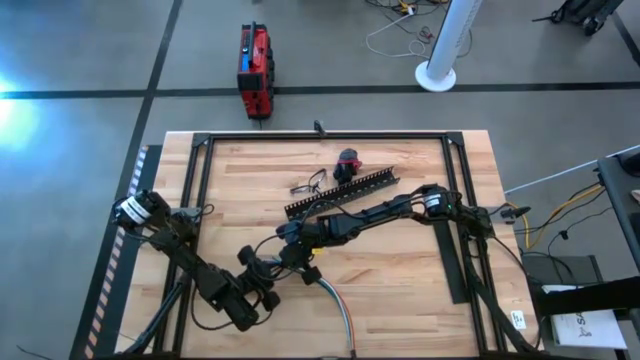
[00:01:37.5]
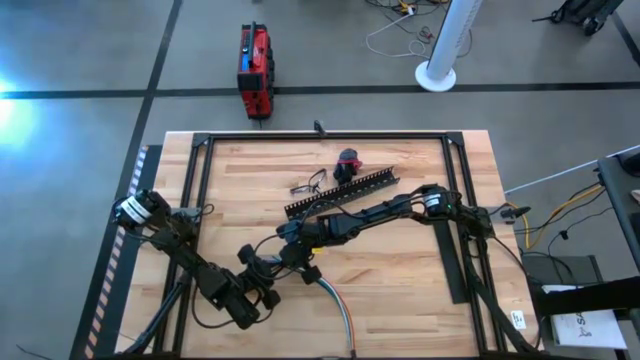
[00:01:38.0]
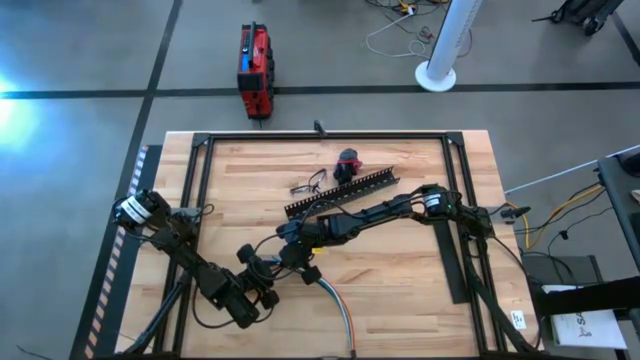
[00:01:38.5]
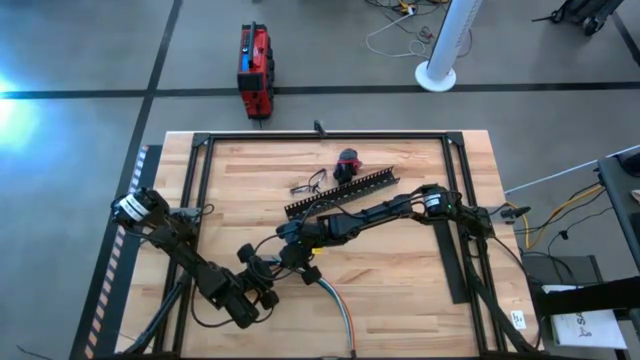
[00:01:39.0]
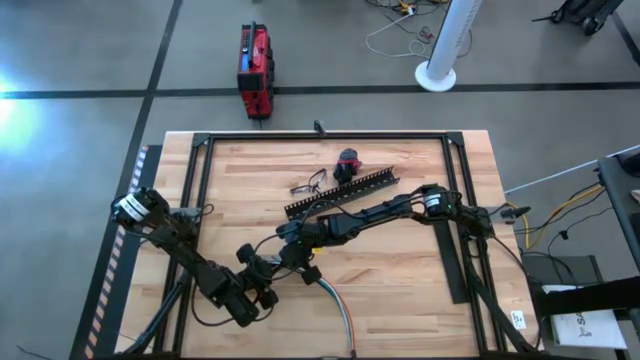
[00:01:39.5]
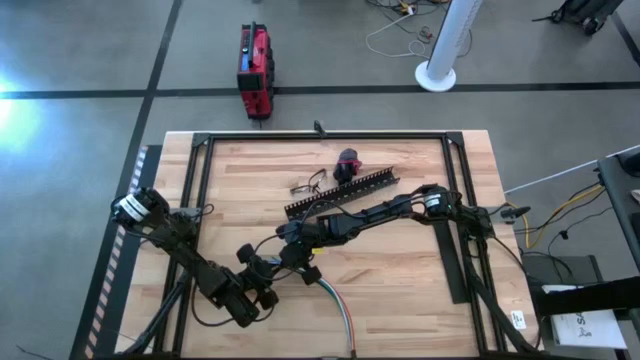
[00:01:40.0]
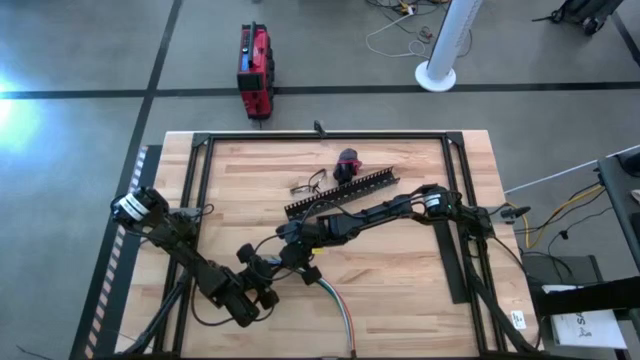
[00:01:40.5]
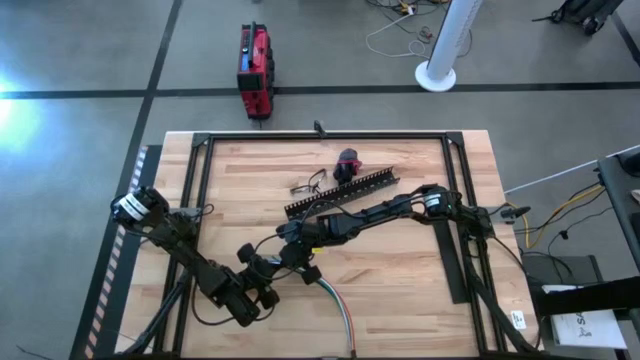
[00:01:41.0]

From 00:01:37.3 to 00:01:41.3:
Task: Ziptie cables
Wrap the cable wires with black zip tie

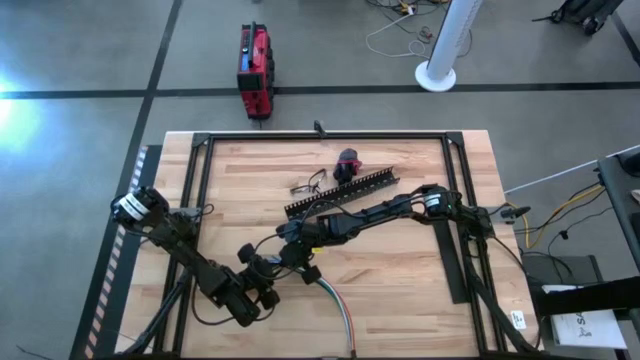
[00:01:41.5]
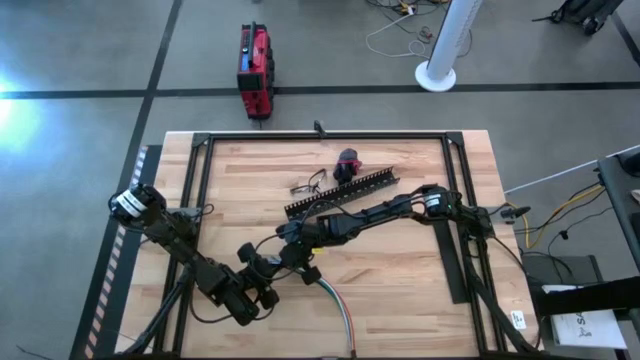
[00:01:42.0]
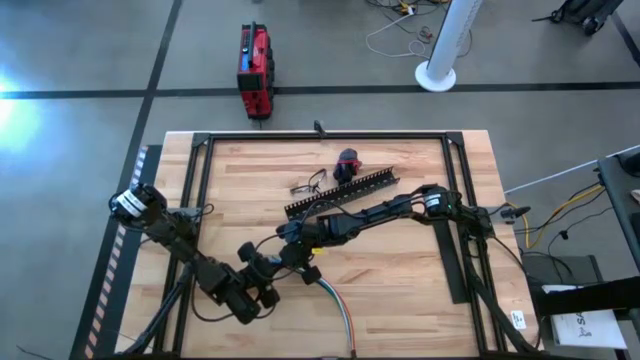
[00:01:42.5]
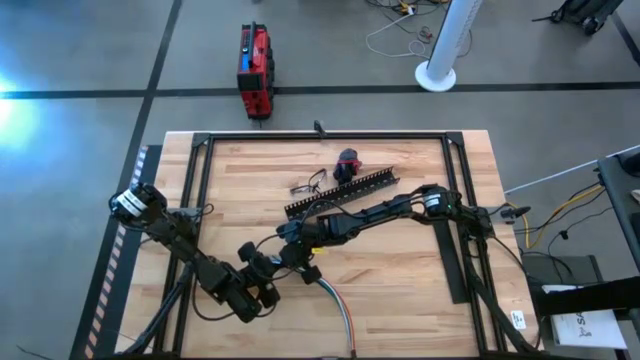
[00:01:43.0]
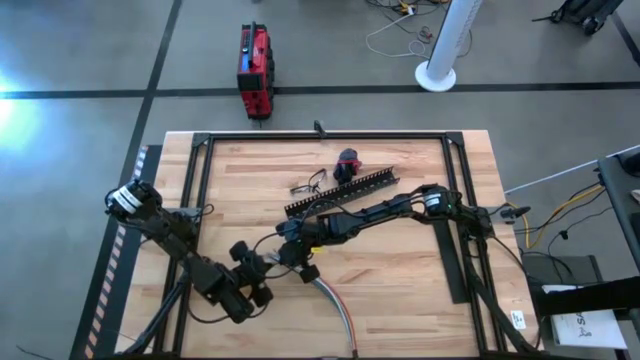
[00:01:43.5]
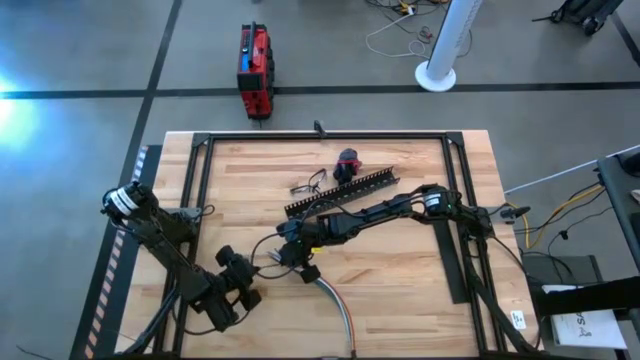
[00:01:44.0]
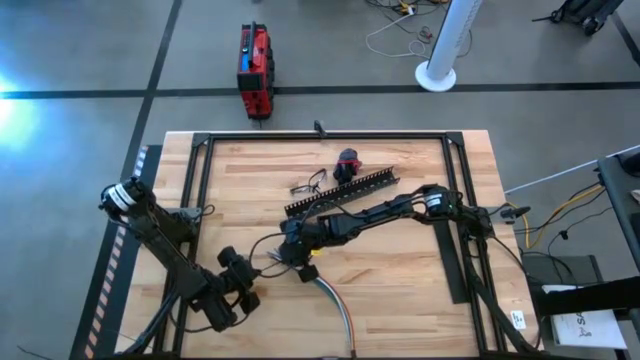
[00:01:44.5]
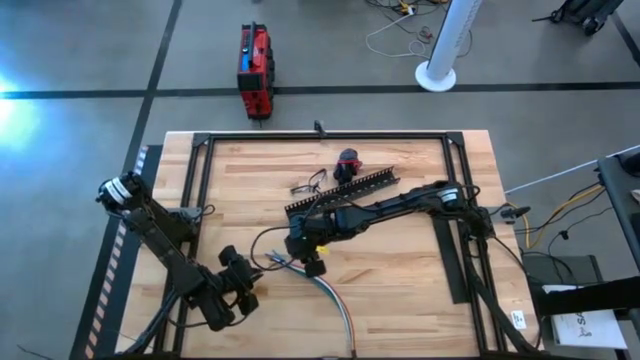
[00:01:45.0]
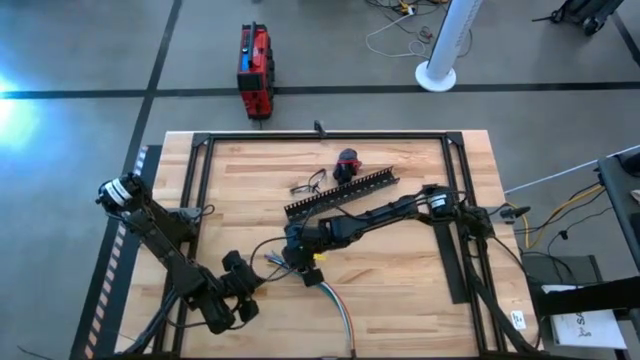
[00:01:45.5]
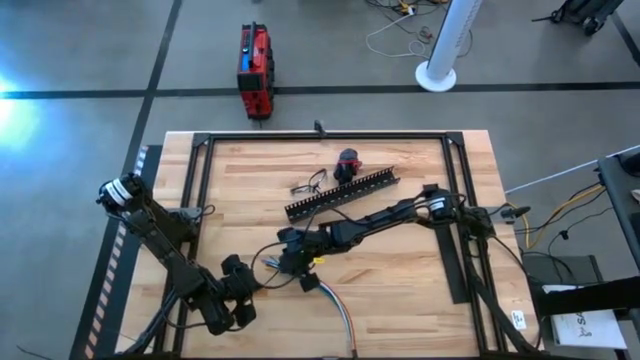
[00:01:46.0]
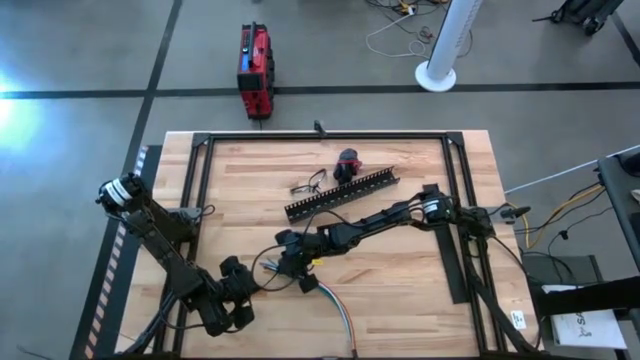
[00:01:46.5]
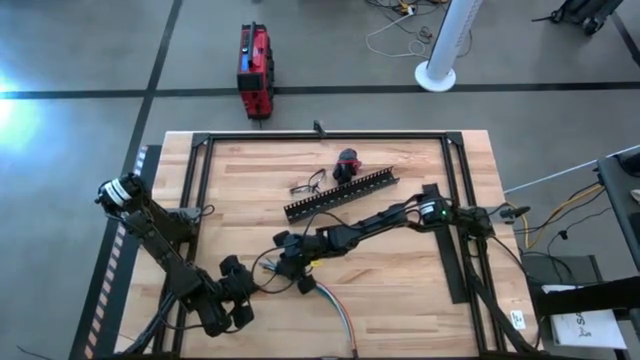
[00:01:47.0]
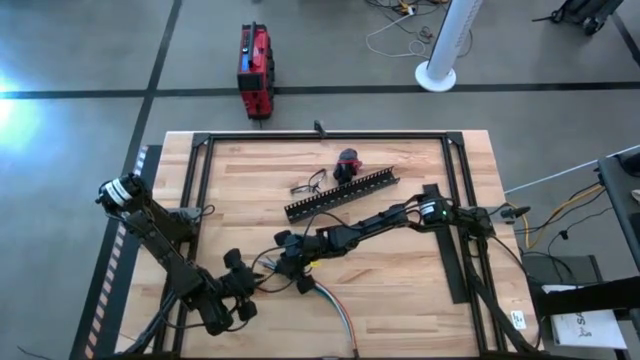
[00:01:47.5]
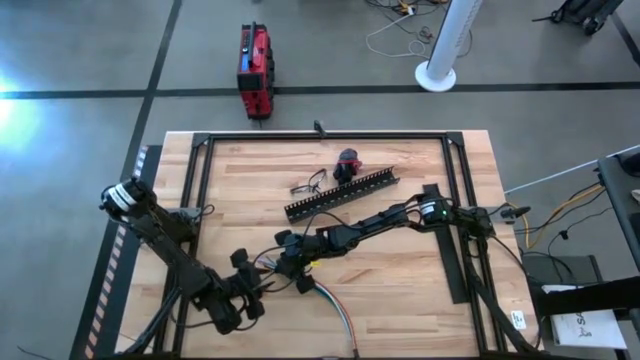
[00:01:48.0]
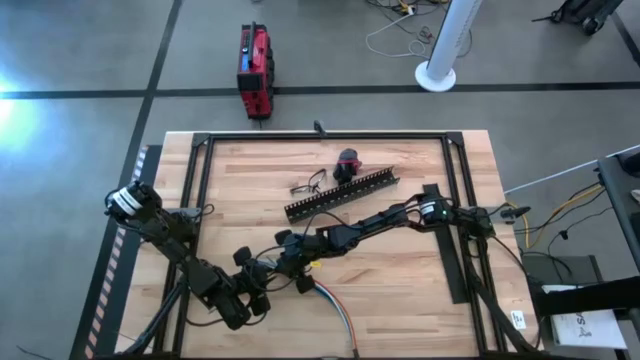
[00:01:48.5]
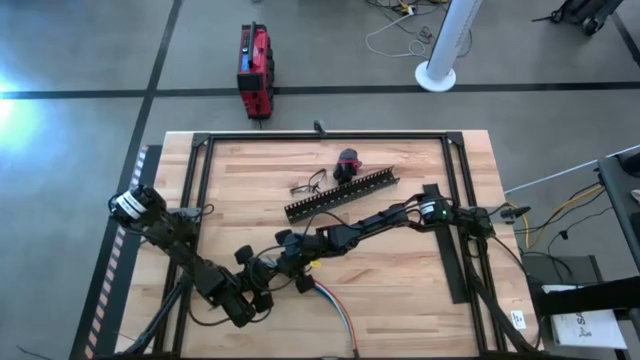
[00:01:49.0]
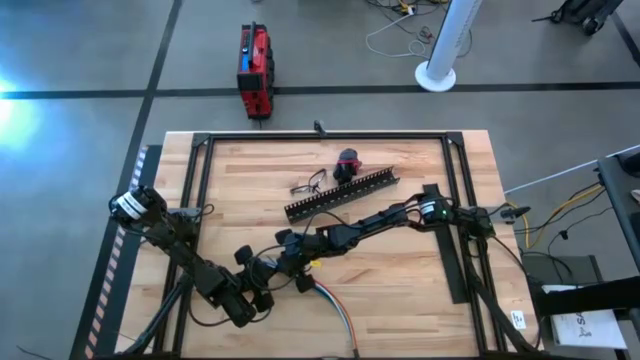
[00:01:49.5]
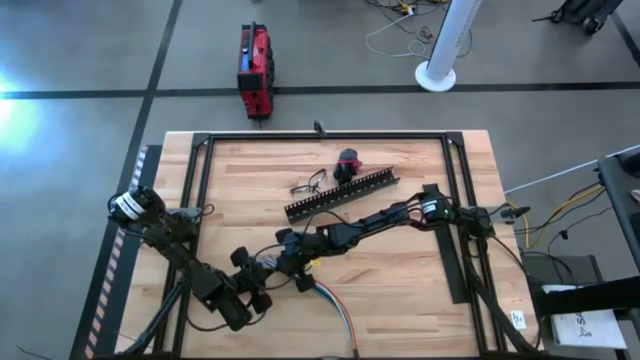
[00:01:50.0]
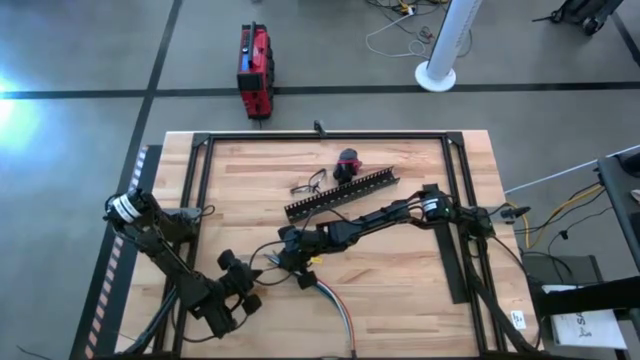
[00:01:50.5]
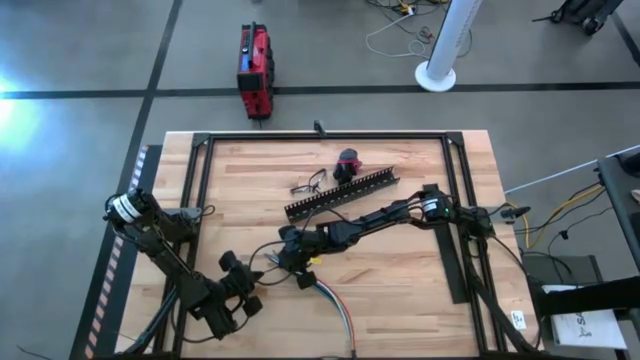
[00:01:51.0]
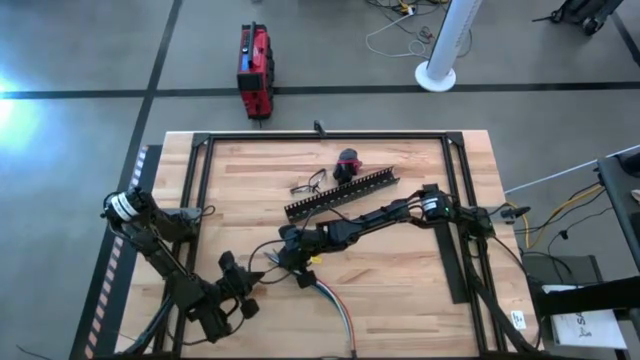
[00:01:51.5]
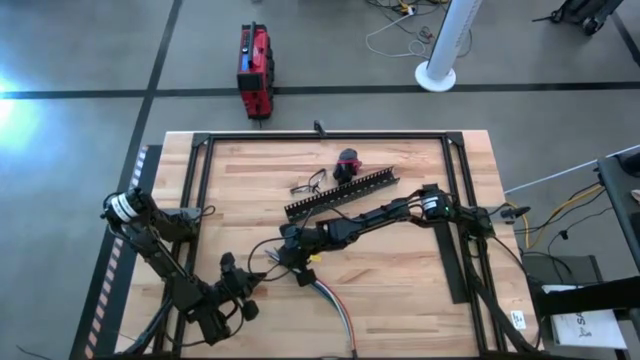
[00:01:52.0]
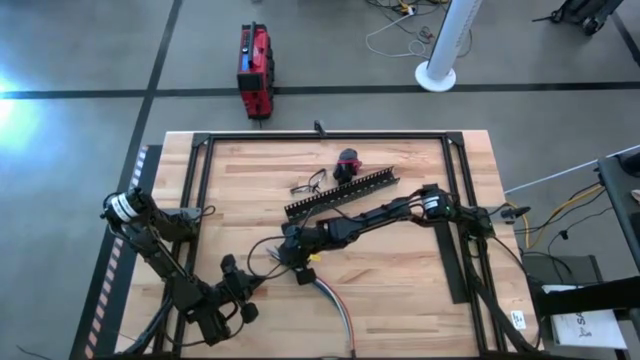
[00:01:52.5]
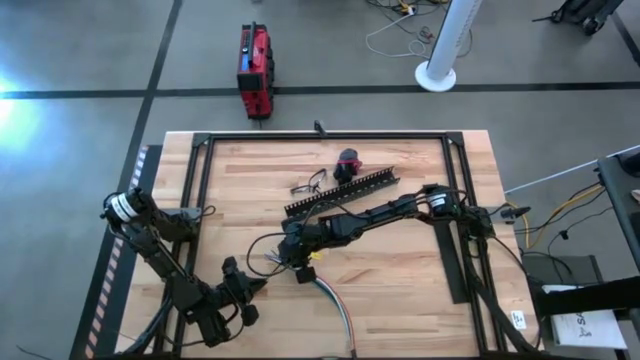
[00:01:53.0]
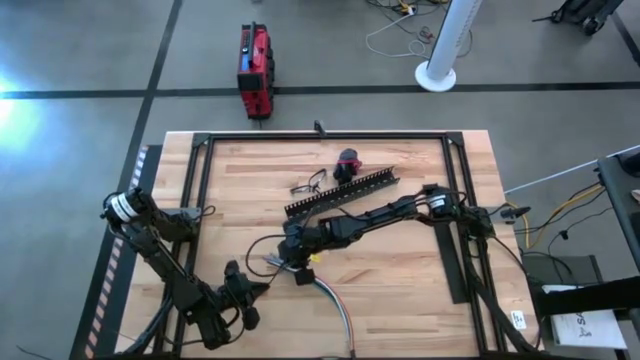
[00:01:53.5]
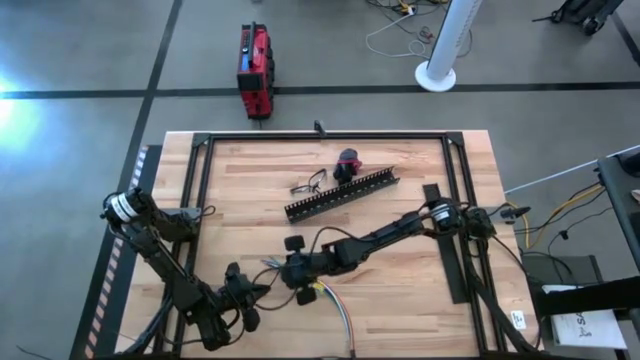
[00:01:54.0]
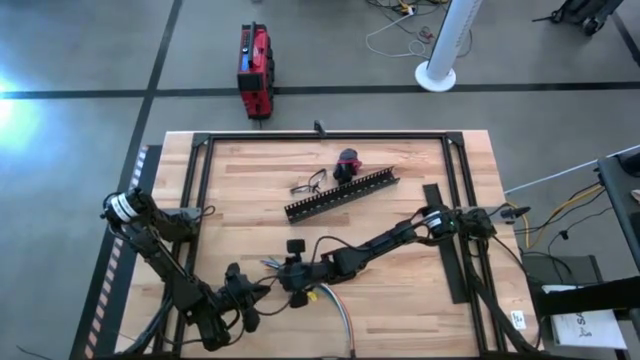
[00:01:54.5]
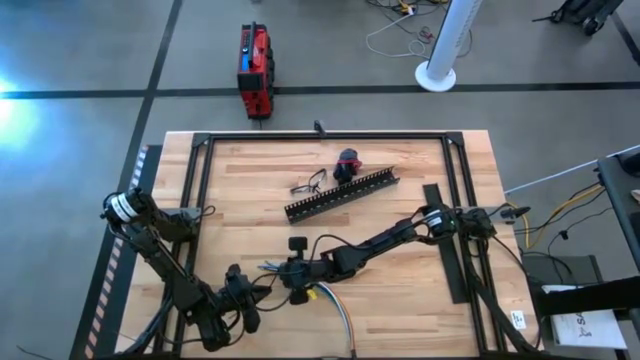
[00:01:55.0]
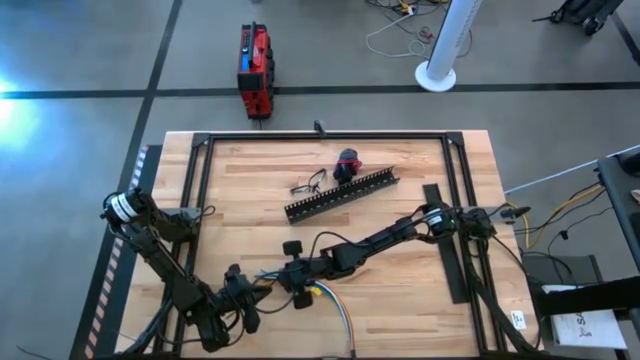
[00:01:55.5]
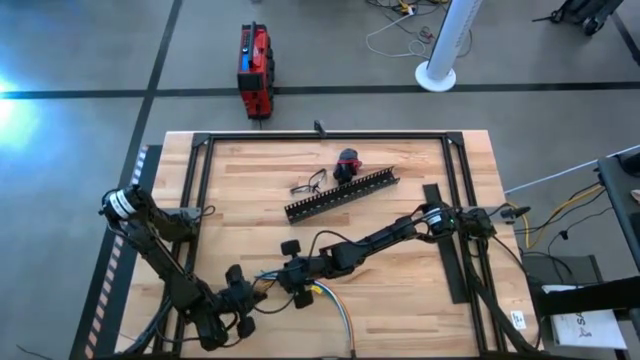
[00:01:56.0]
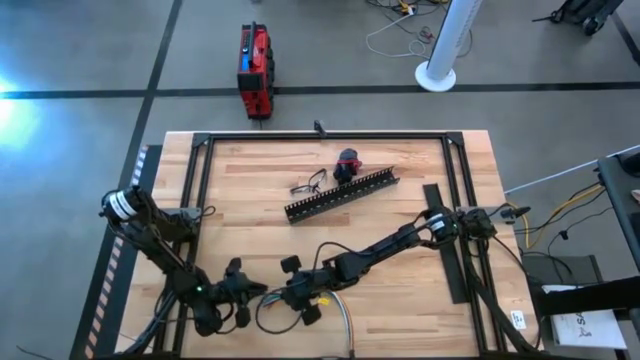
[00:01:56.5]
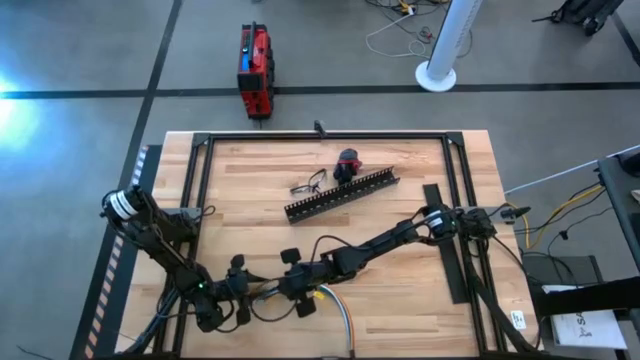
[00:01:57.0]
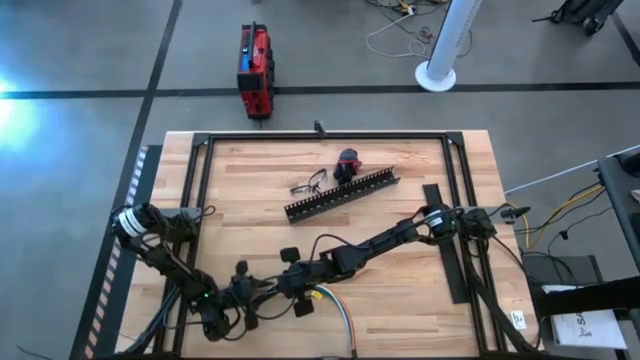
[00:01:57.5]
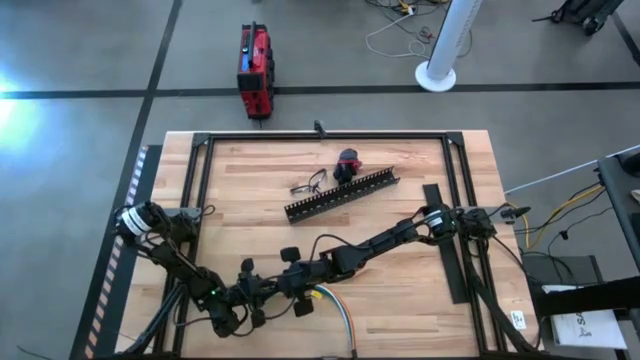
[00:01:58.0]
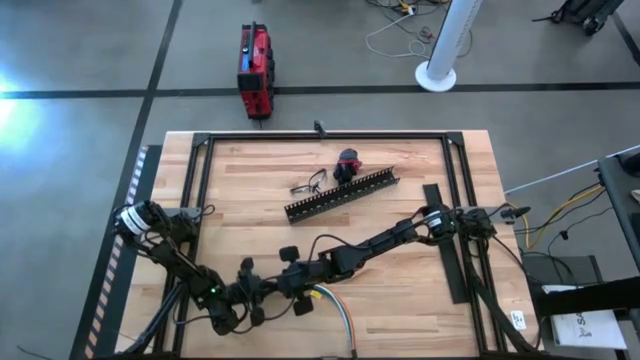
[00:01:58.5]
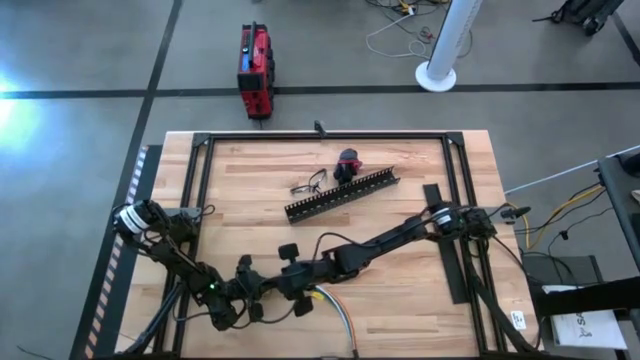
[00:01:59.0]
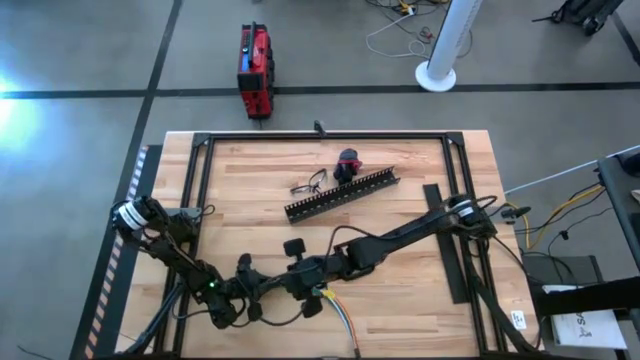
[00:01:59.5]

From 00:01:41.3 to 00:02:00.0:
Wrap the cable wires with black zip tie
